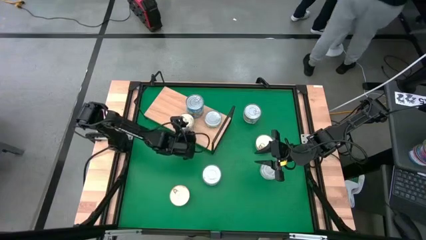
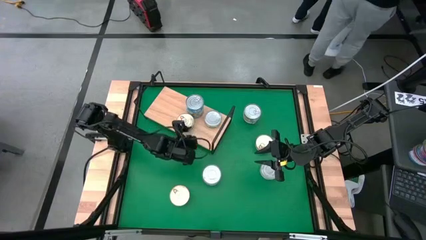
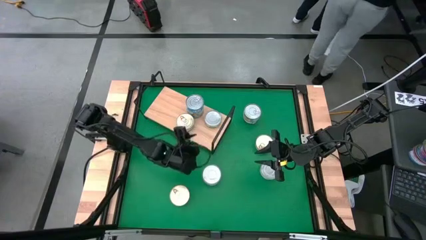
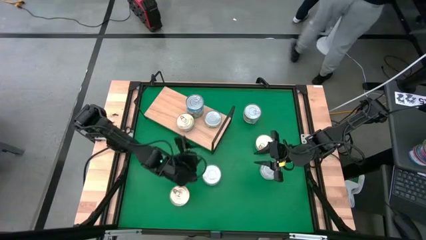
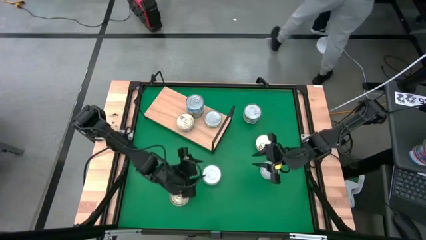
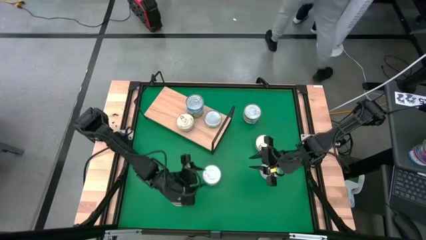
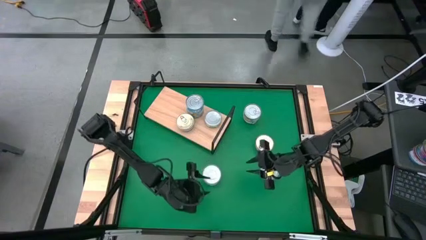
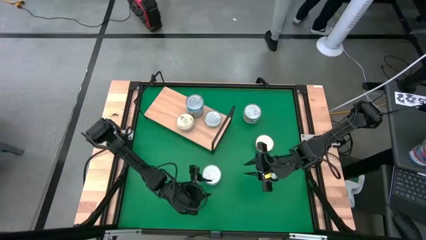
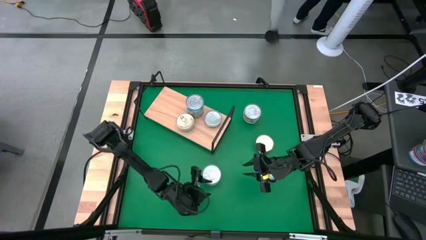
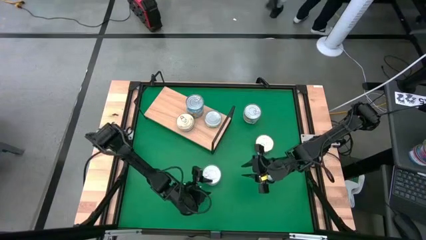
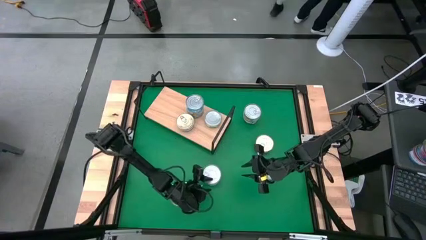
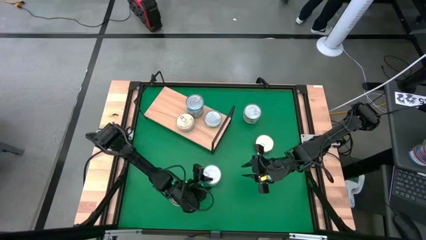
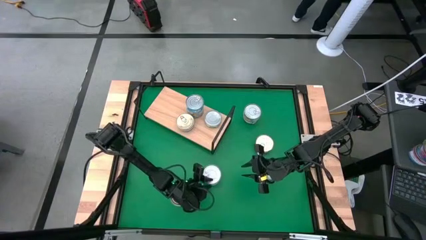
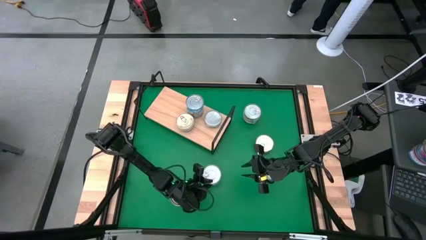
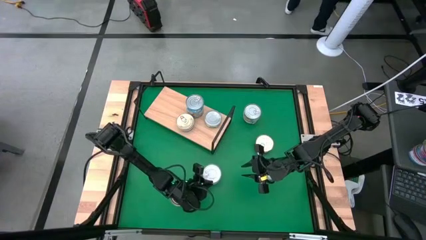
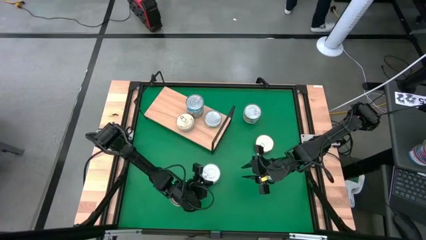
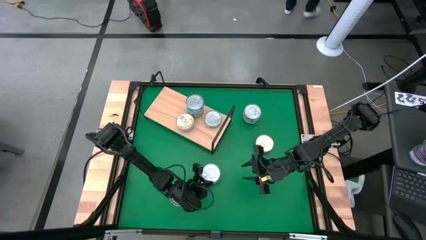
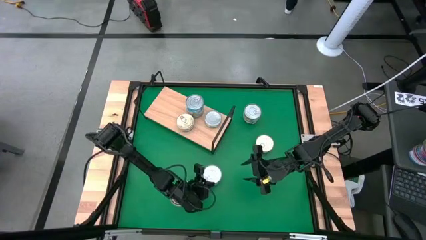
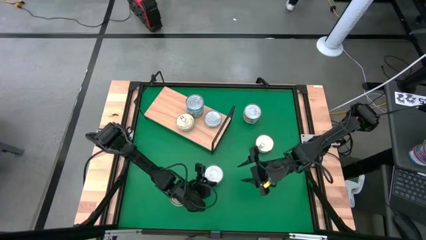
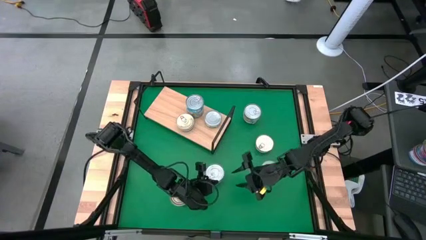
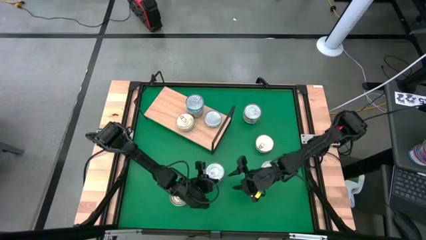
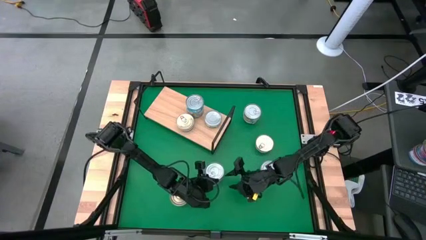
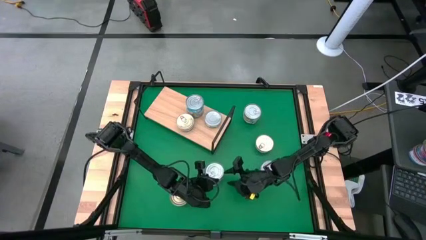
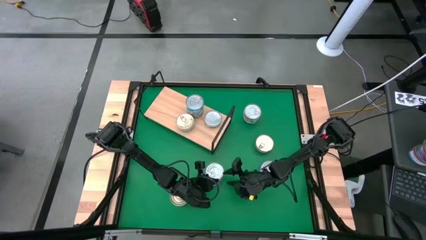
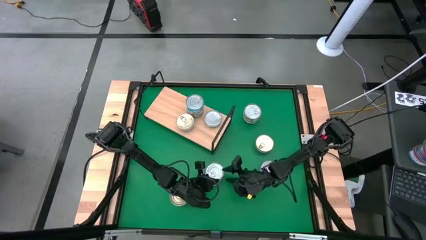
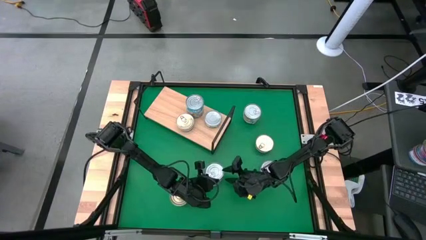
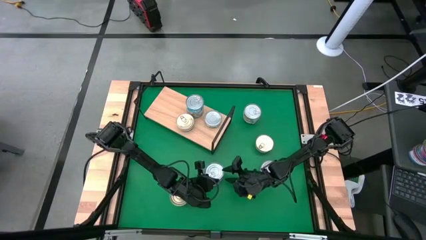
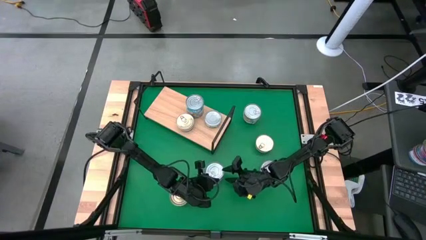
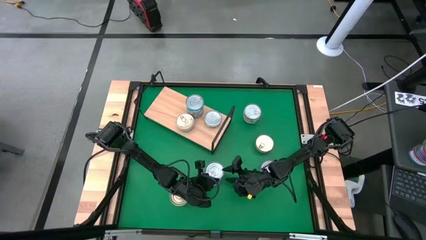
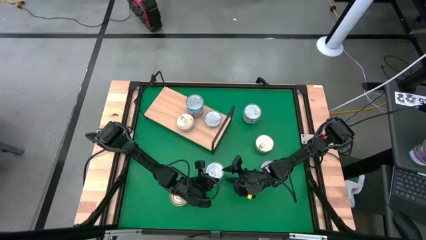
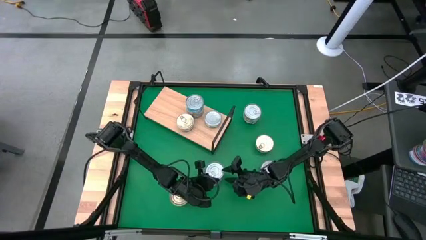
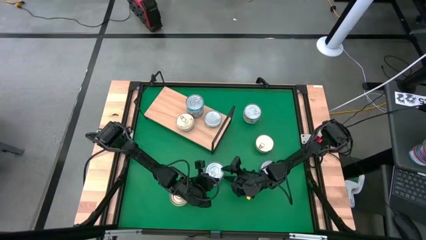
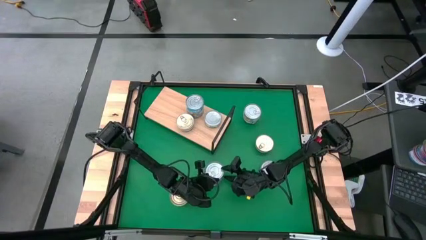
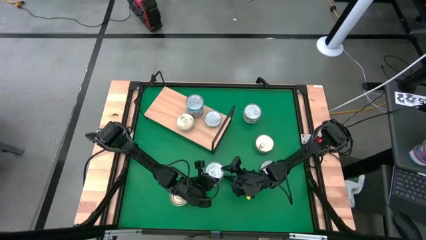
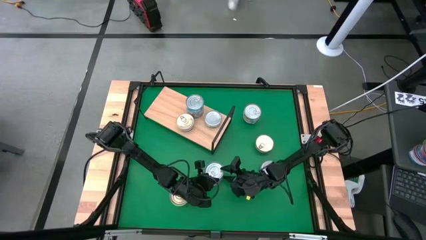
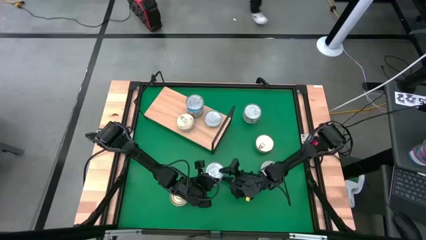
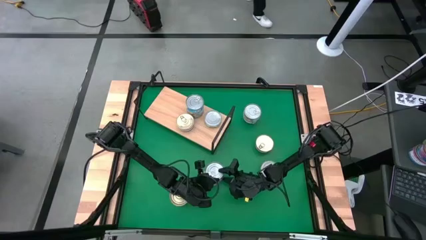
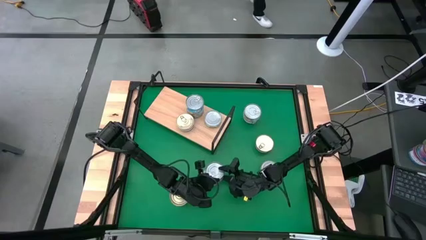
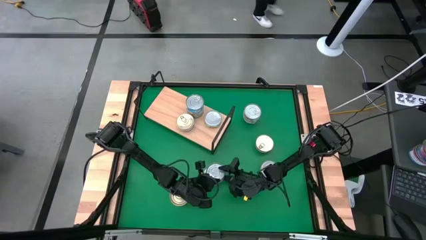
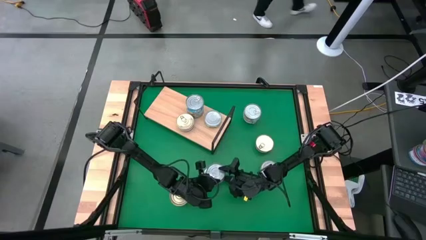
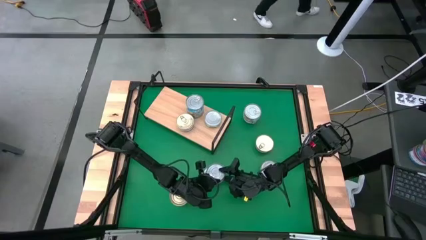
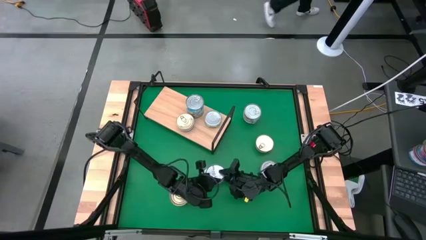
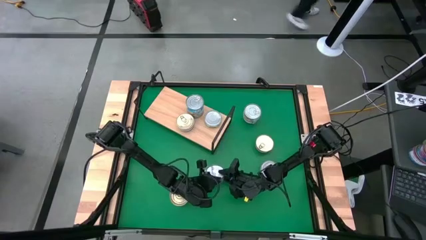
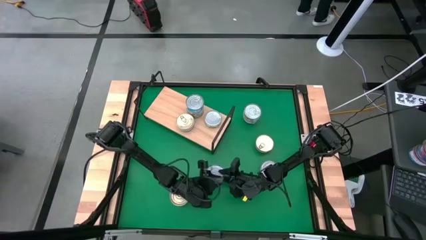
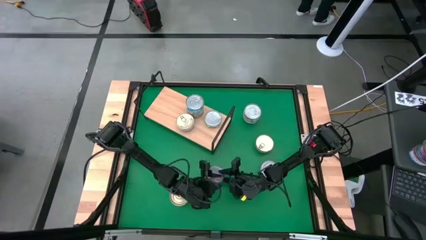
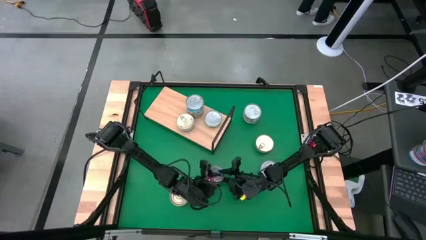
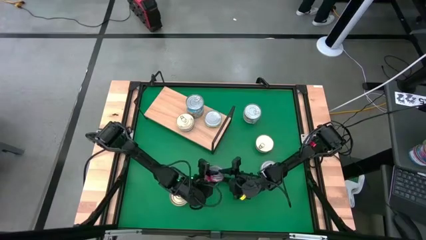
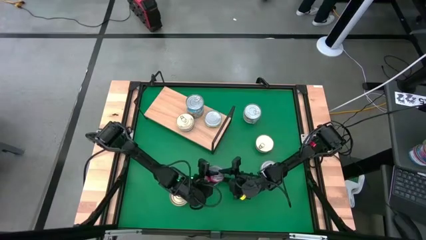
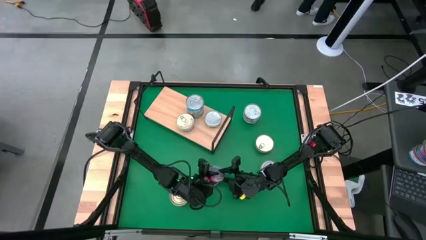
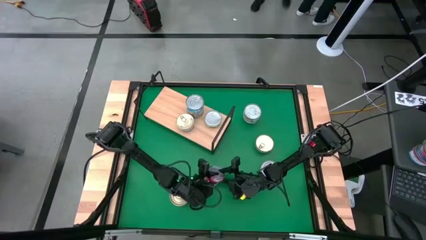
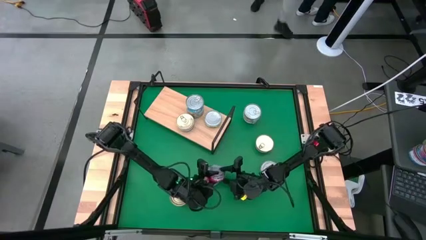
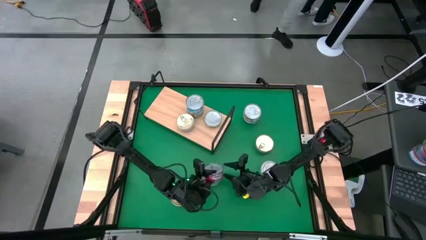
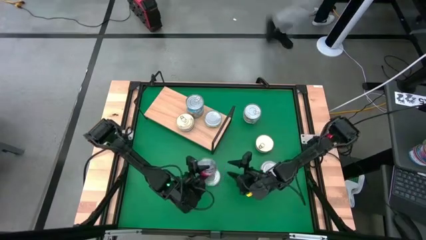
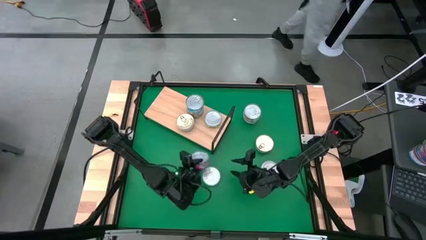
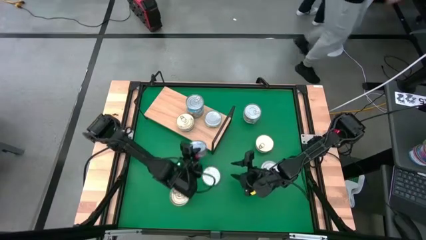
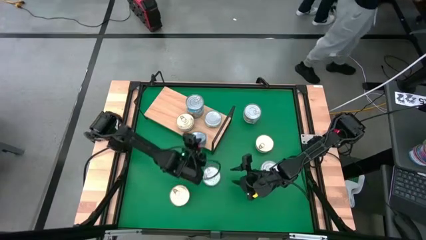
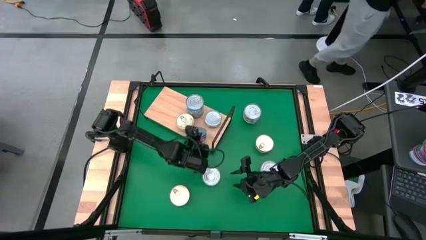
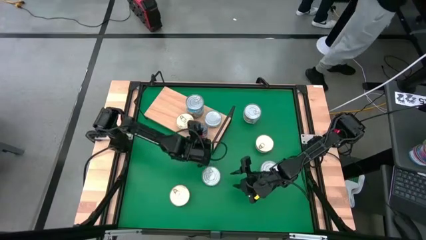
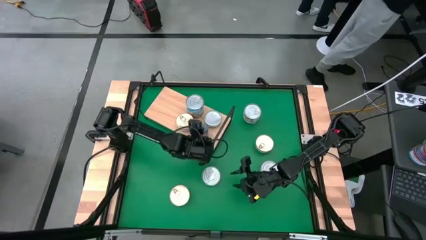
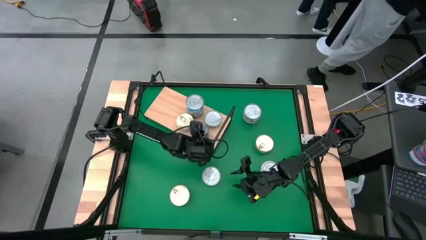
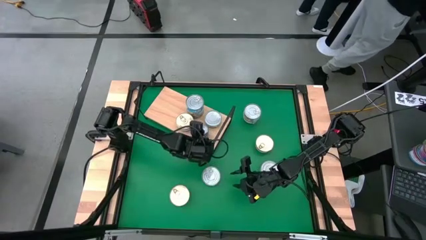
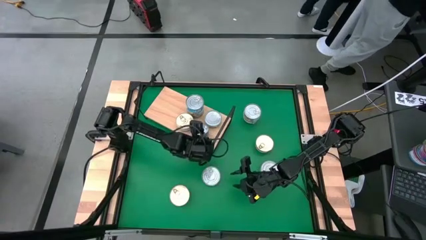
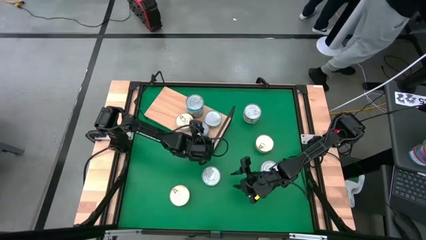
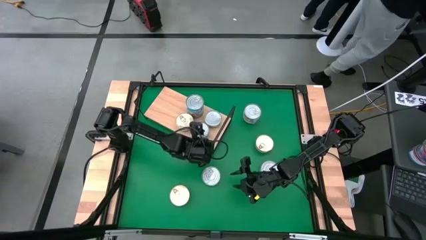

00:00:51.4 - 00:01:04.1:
Task: Stack canned seafood by type on shelf
Put the red tuna can on the shelf
